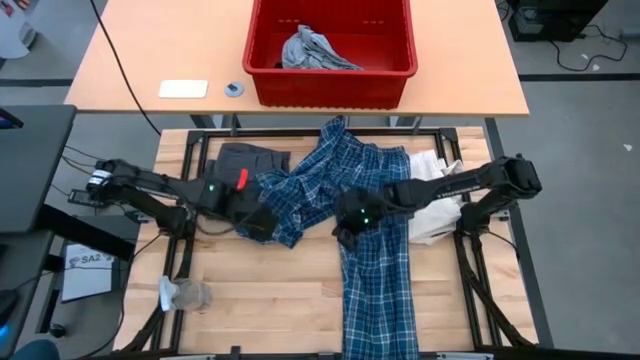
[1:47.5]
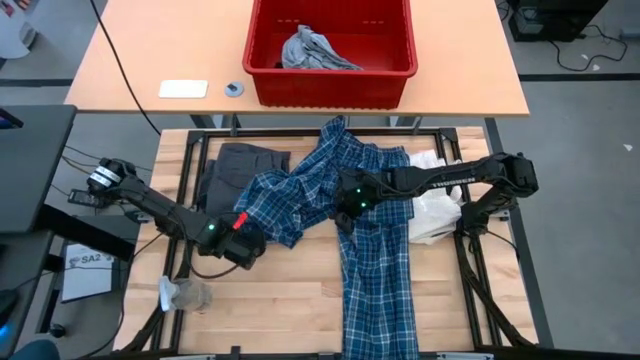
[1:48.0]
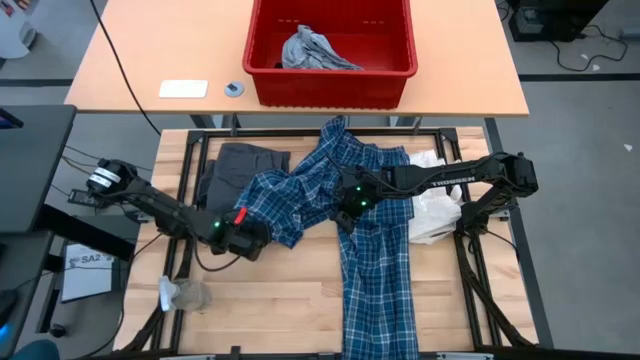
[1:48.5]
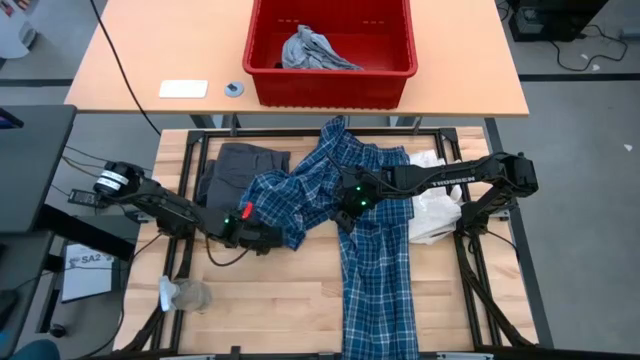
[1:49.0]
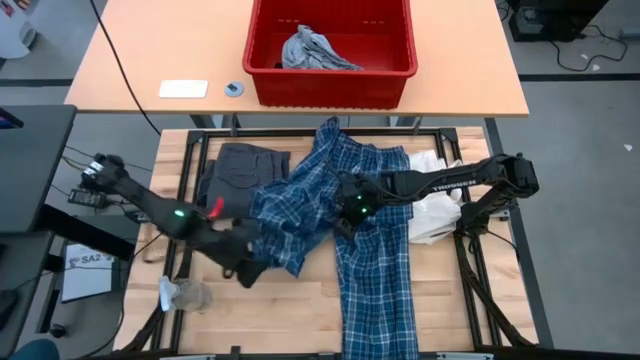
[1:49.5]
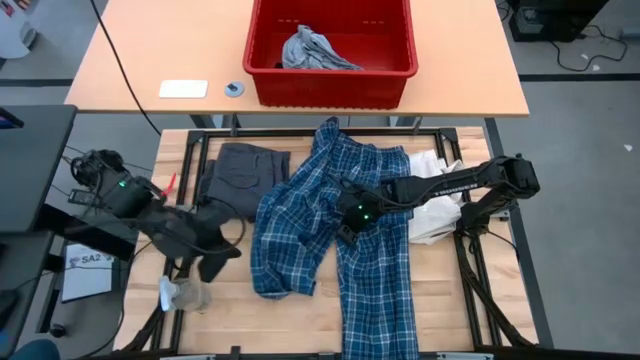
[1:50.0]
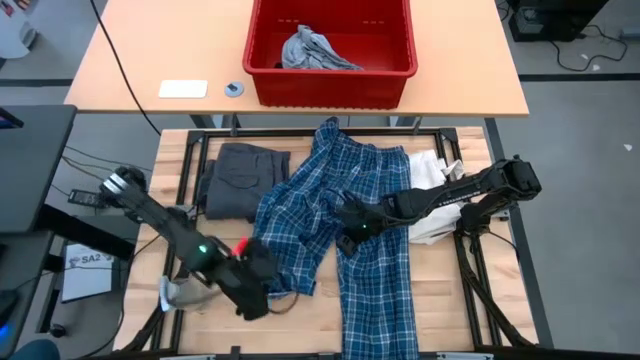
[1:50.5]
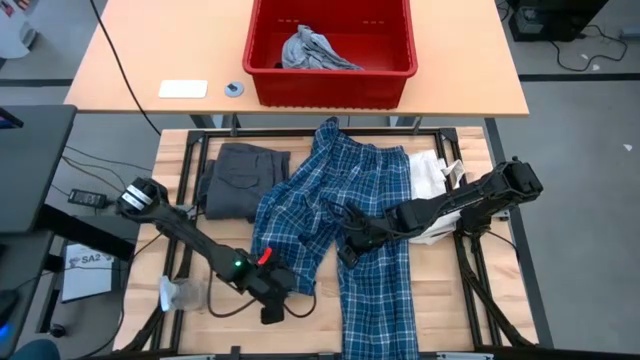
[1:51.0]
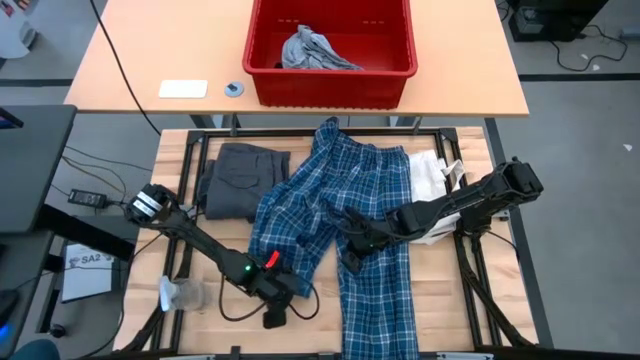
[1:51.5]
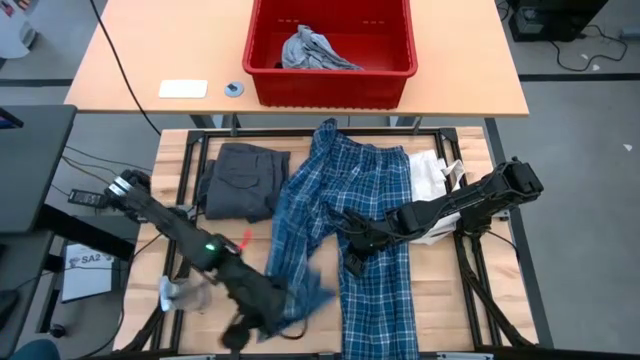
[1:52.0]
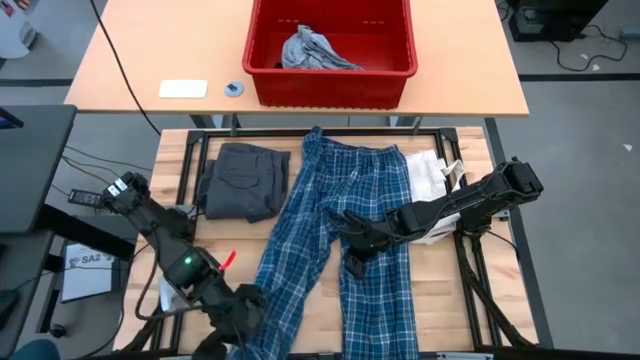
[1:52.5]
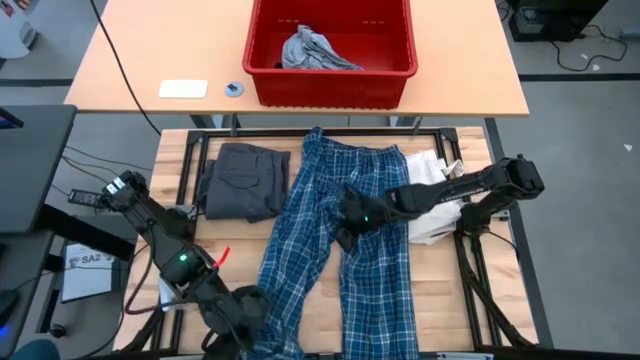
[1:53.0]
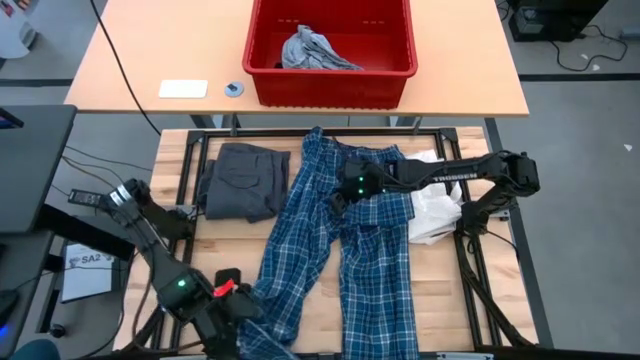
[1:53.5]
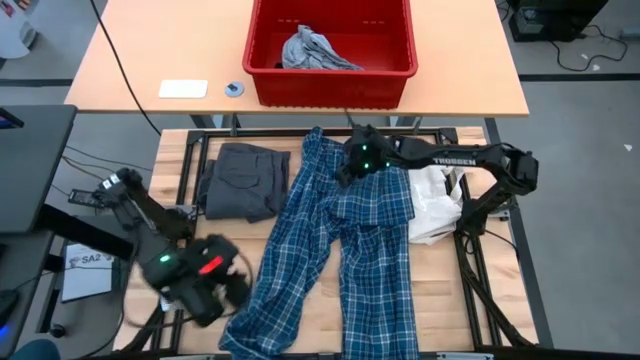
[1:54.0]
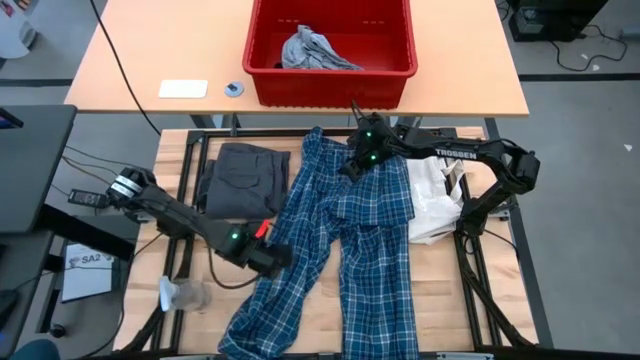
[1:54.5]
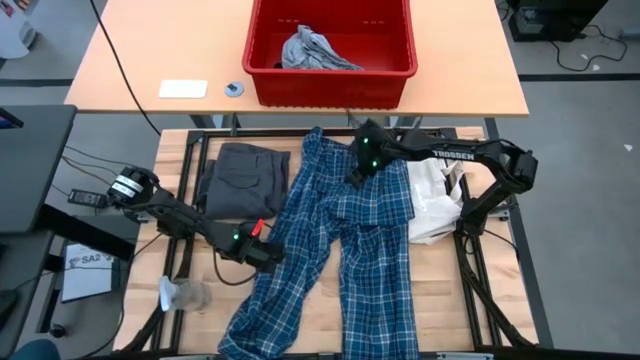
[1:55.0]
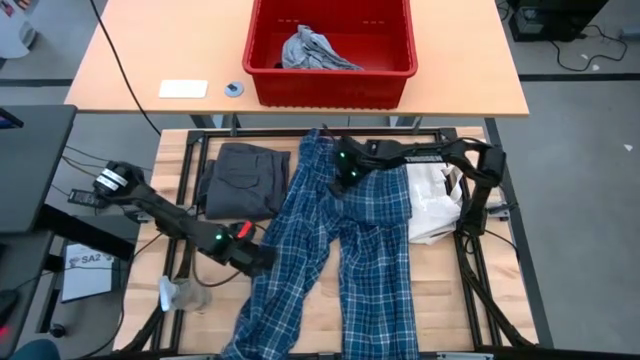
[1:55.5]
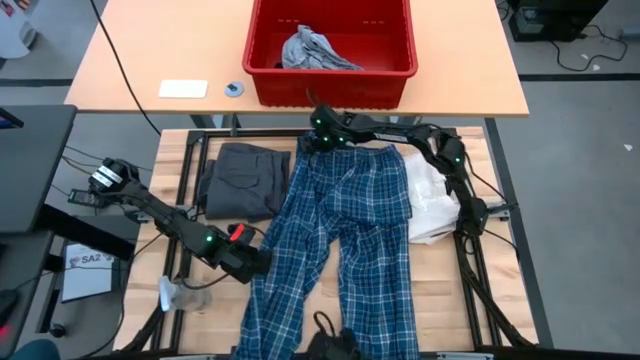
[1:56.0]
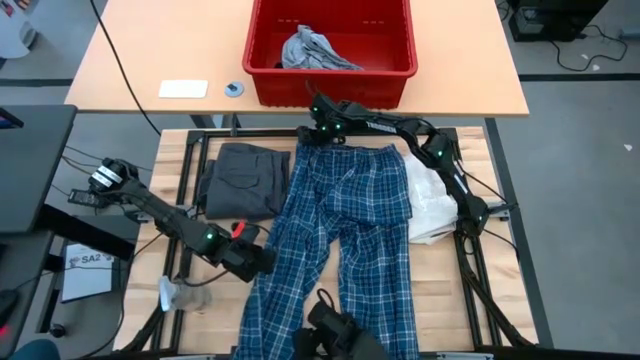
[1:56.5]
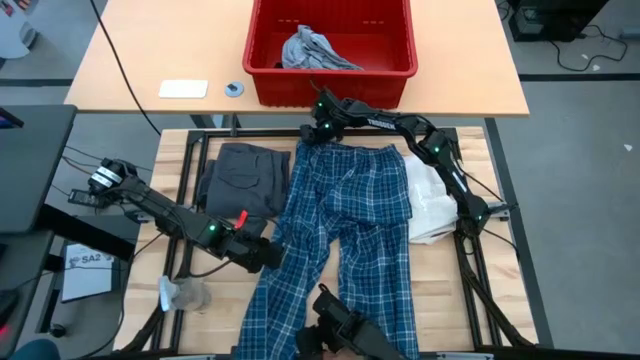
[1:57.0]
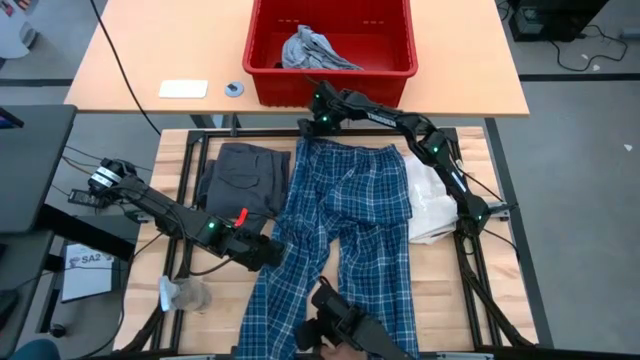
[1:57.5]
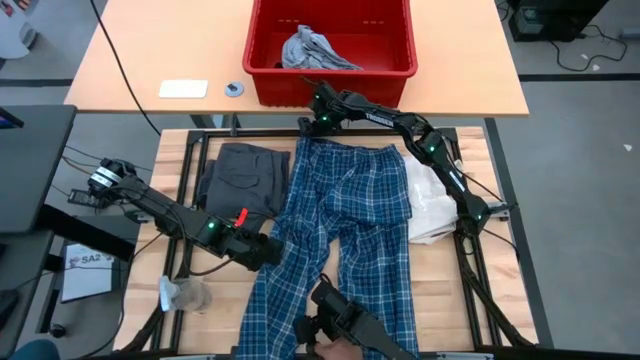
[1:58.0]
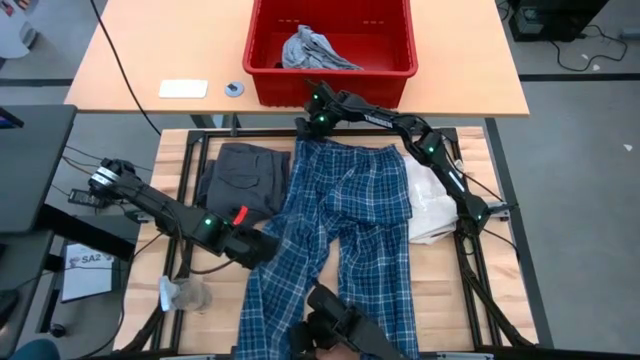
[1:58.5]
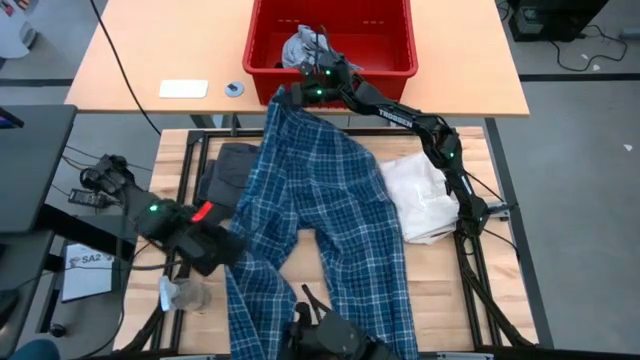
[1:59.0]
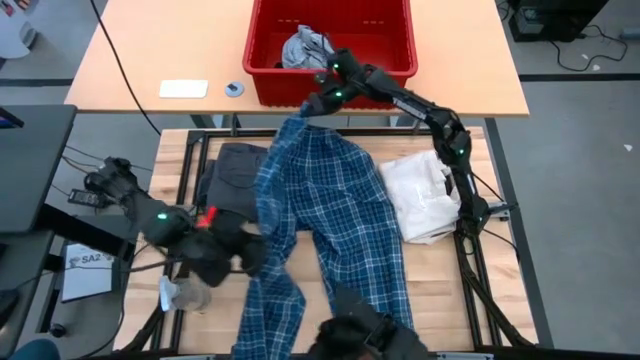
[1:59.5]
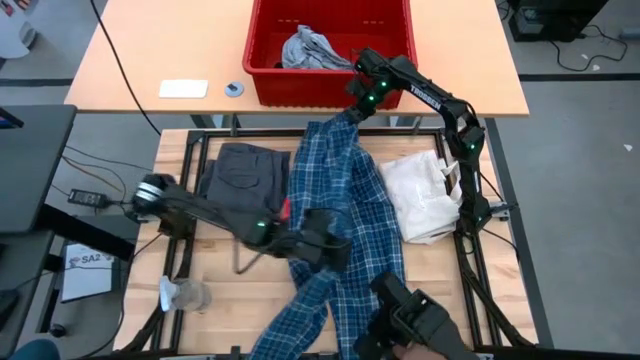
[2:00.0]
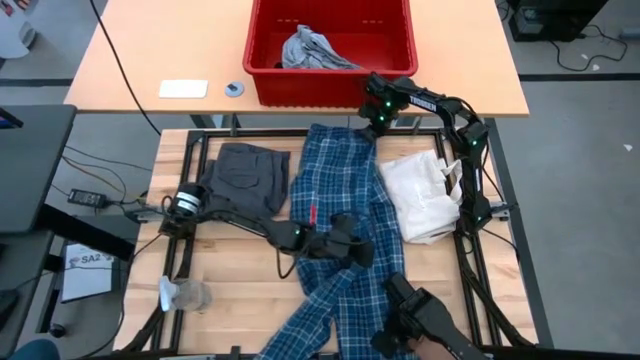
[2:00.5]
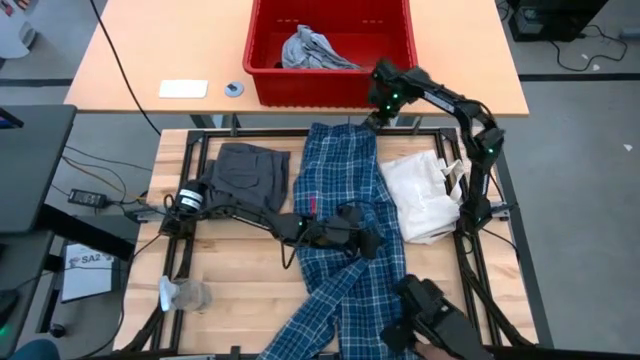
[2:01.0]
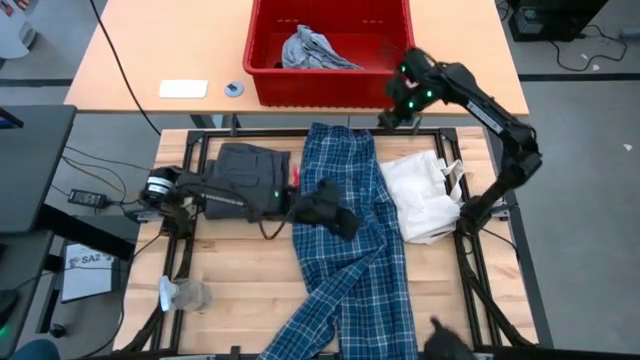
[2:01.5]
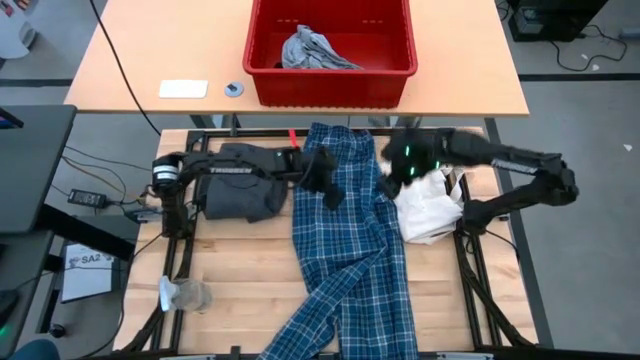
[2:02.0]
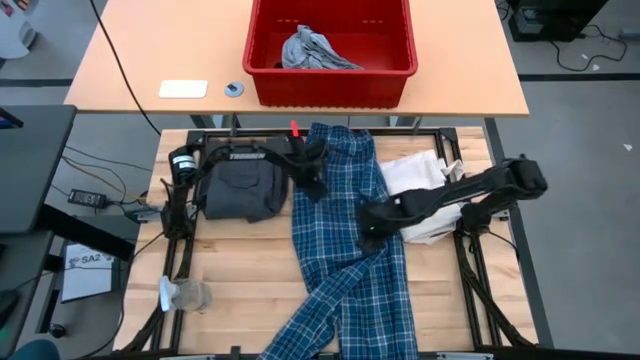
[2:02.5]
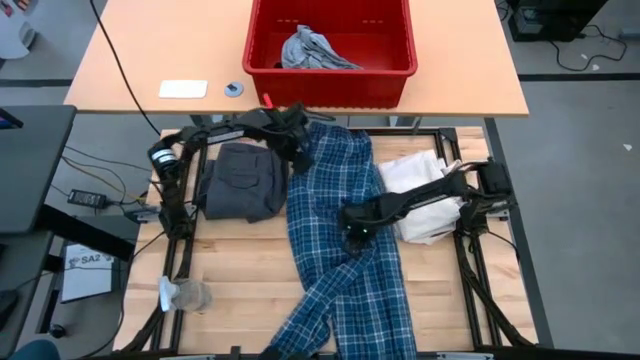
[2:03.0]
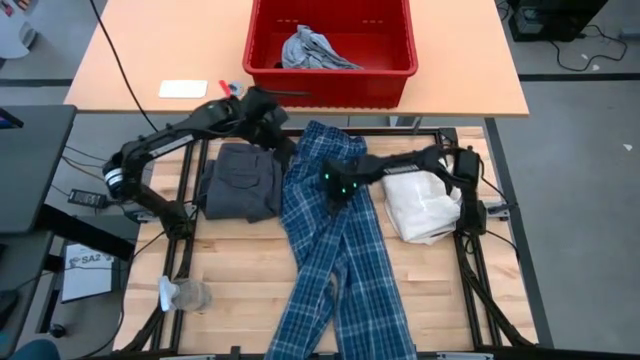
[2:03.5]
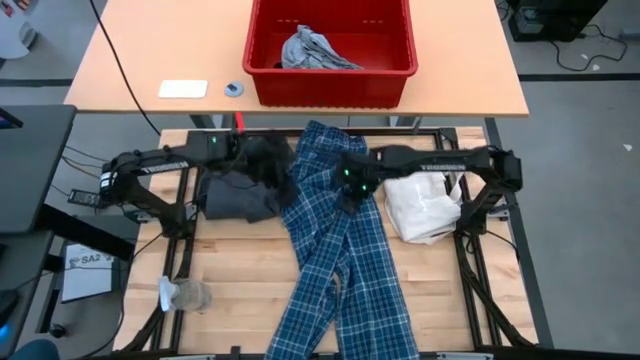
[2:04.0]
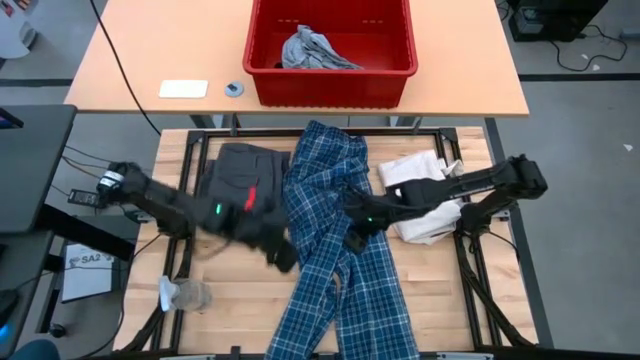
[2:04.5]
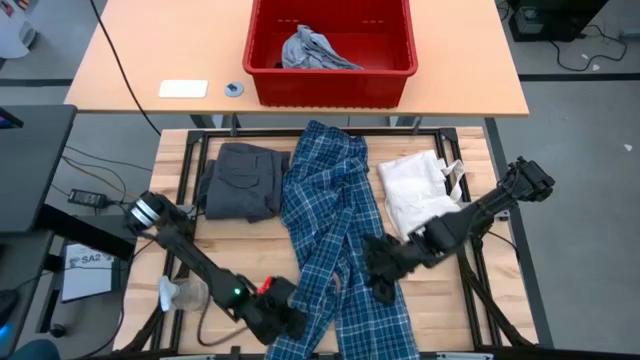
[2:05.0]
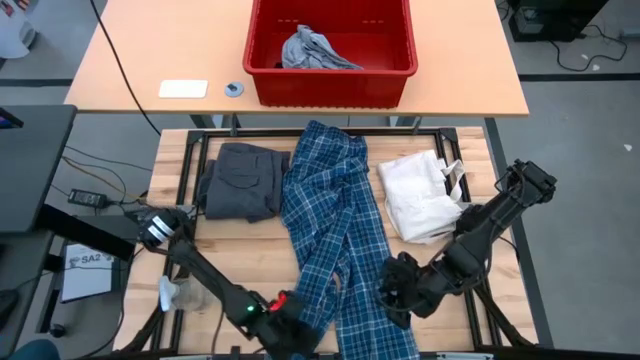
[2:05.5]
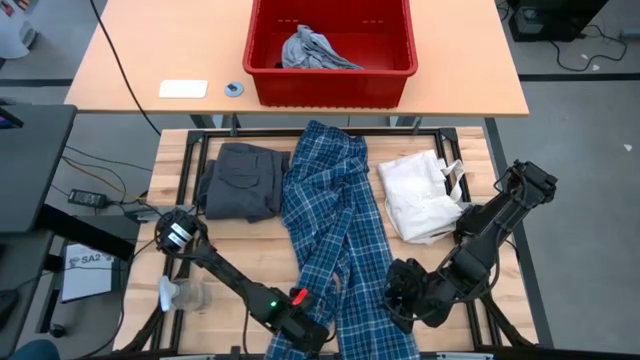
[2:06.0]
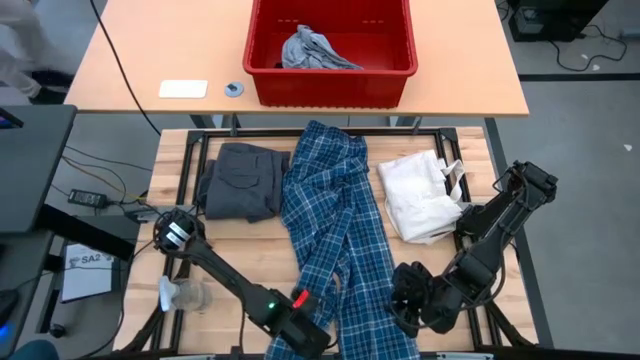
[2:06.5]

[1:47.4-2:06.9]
Task: Fold Laundry from Bin
Fold the plaid pants

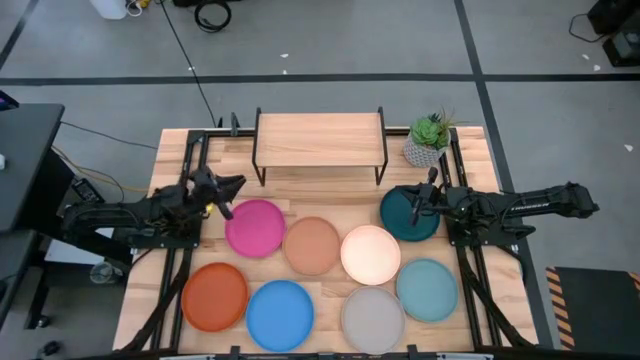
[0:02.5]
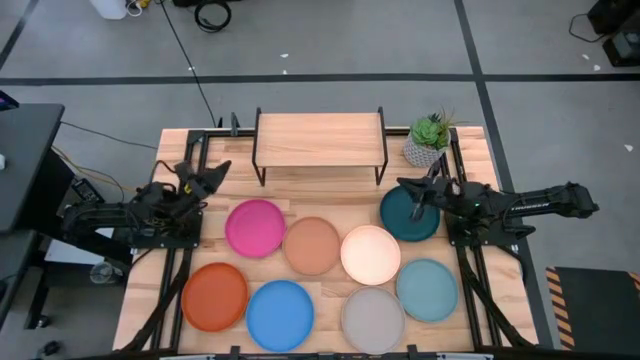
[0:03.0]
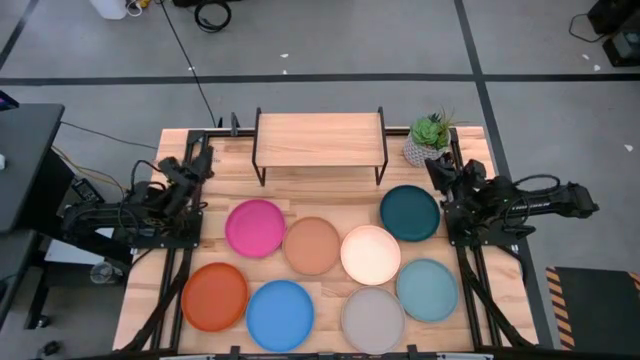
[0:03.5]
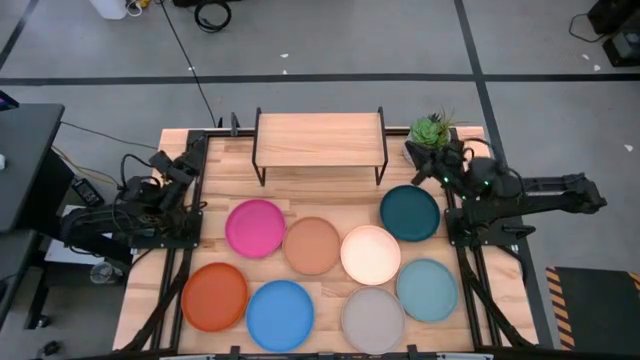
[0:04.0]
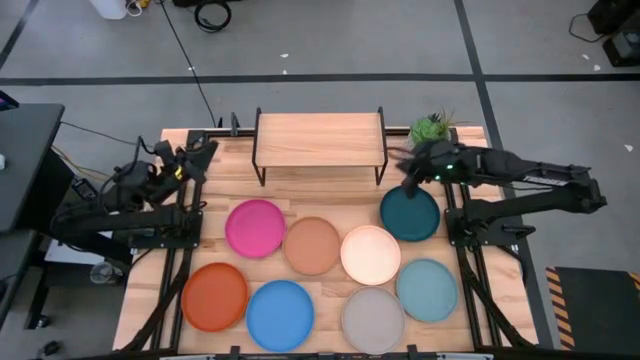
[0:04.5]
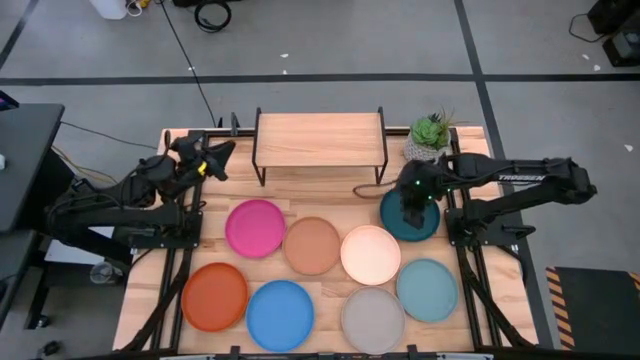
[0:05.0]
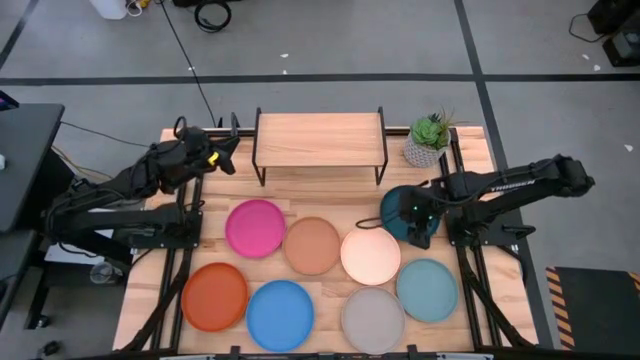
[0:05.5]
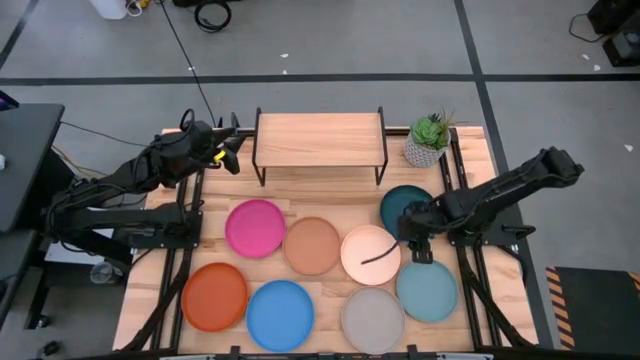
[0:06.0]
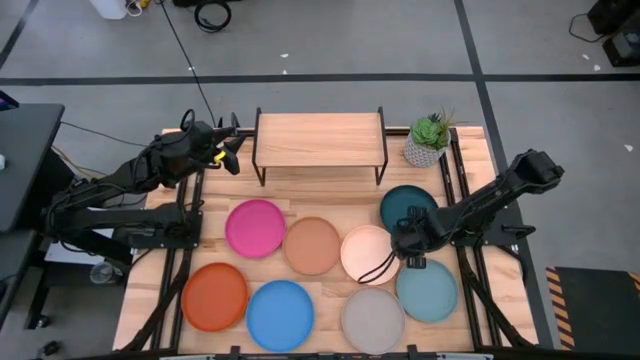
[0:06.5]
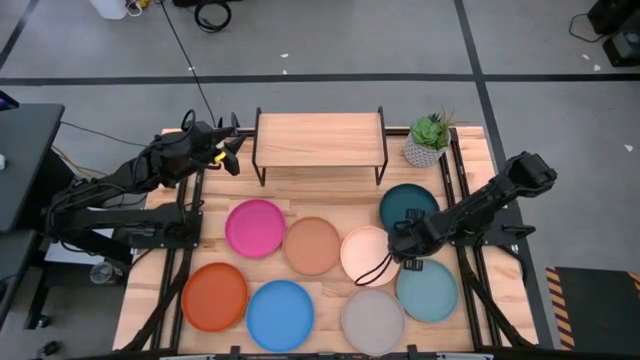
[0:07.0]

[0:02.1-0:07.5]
Task: Place and stack plates onto a shelf
Put the dark blue plate on the shelf
